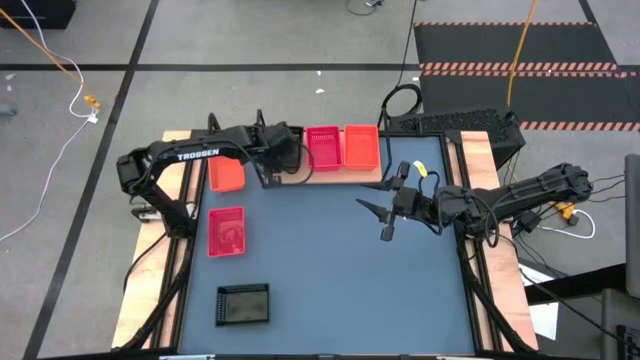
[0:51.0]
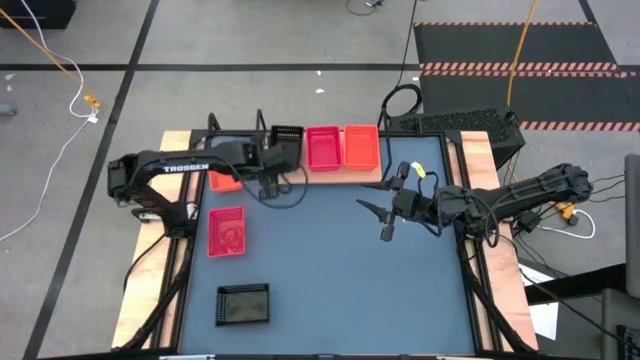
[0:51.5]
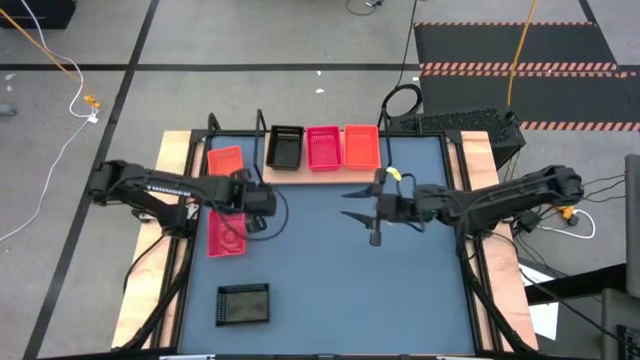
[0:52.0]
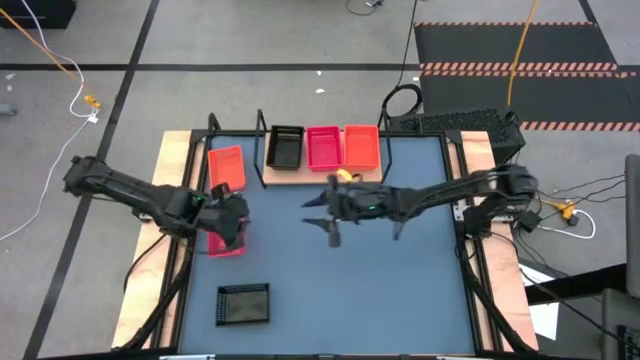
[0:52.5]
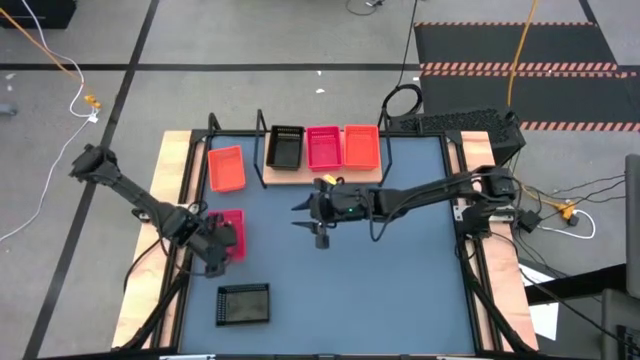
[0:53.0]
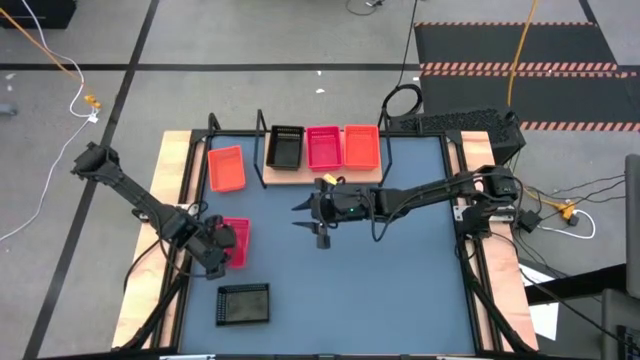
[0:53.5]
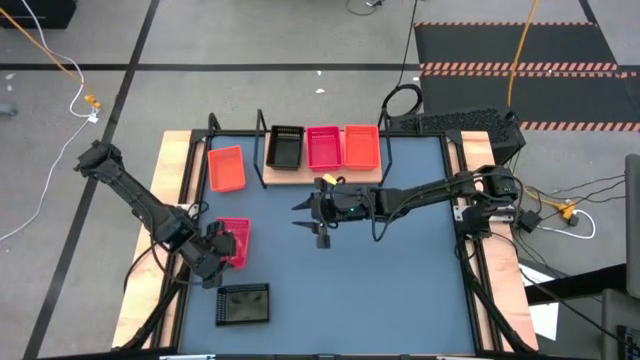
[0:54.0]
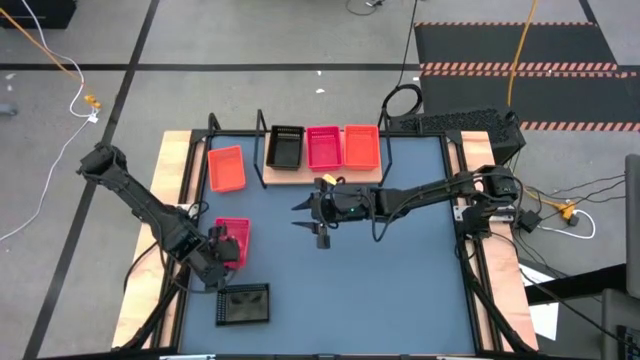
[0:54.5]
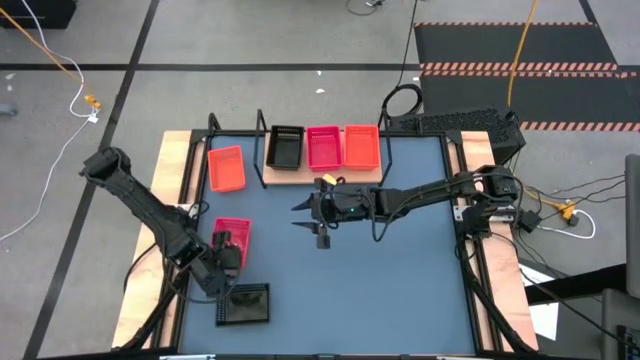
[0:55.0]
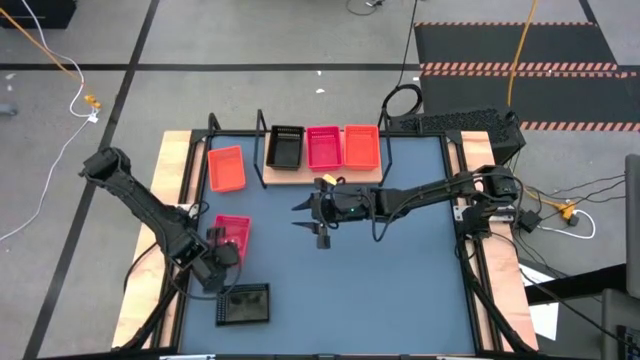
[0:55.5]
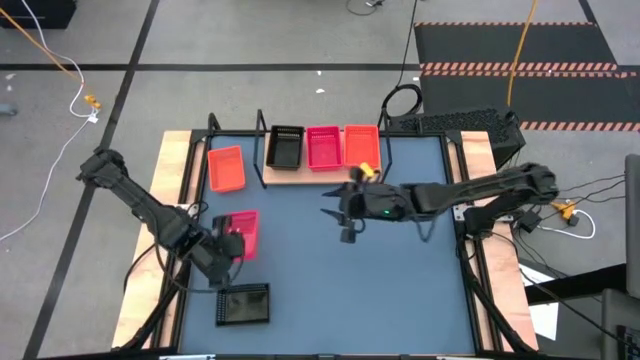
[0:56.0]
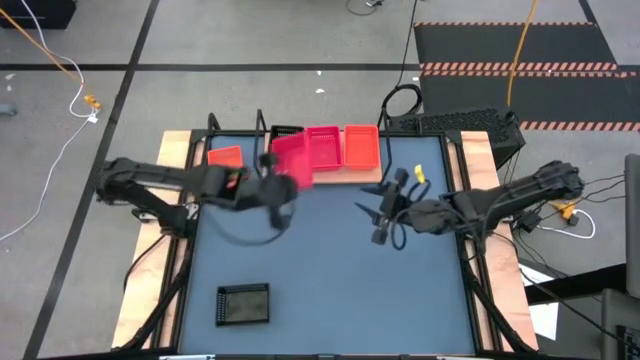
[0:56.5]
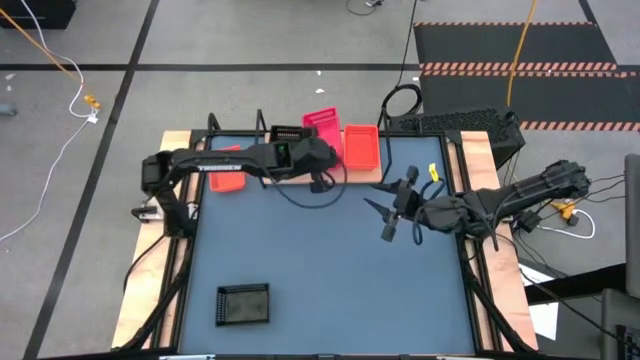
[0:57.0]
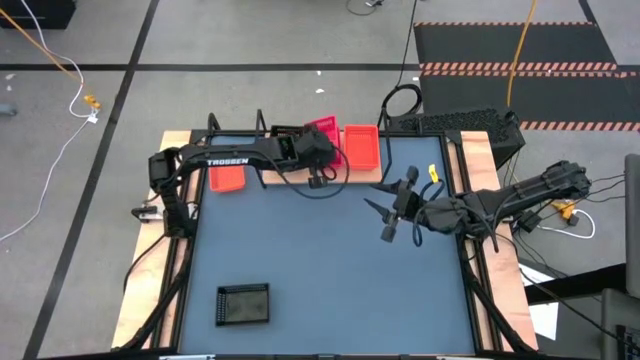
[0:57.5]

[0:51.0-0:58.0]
Task: Stack baskets on shelf by color
Stack the red bin on the red bin on the shelf

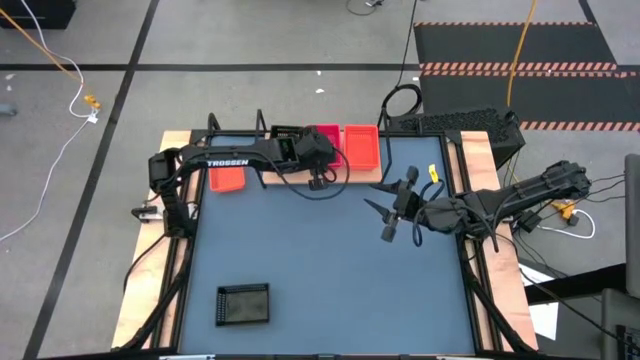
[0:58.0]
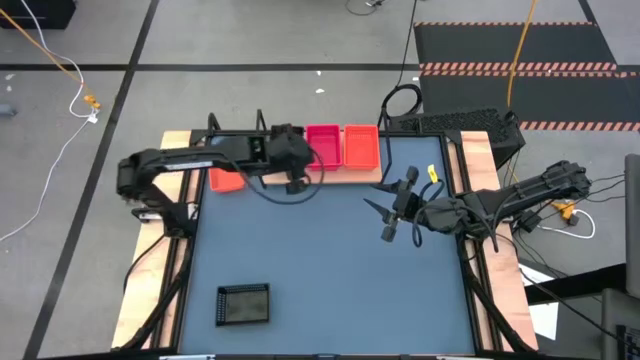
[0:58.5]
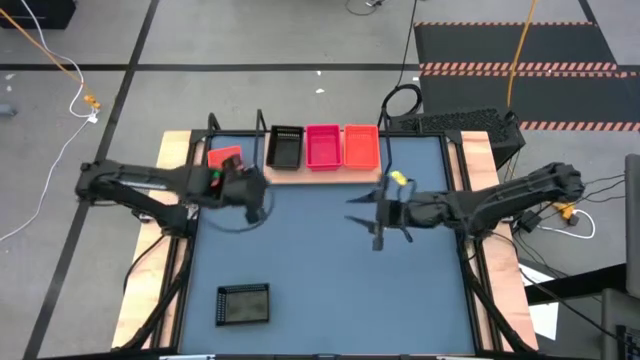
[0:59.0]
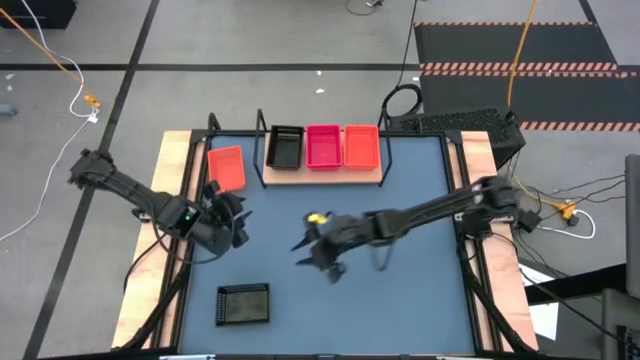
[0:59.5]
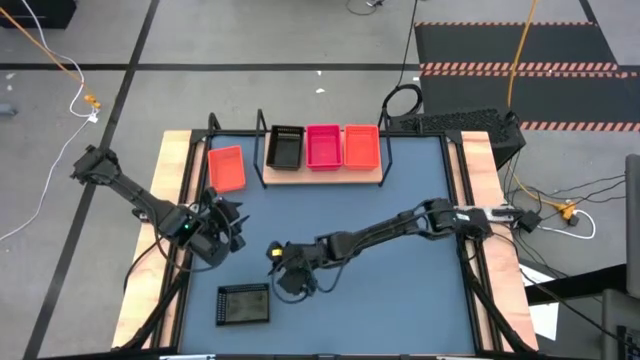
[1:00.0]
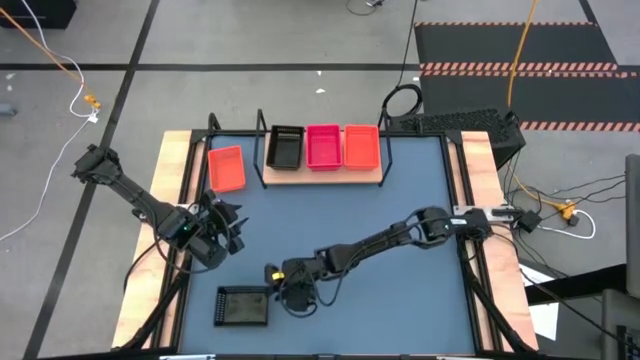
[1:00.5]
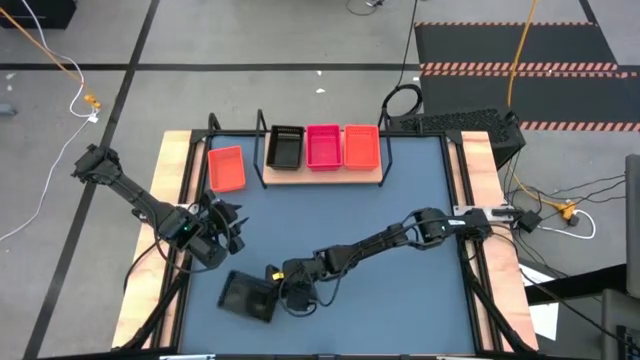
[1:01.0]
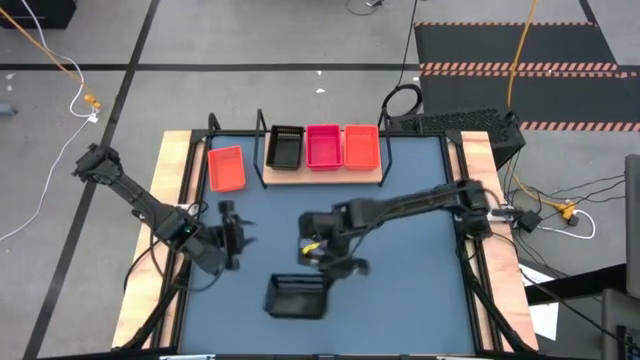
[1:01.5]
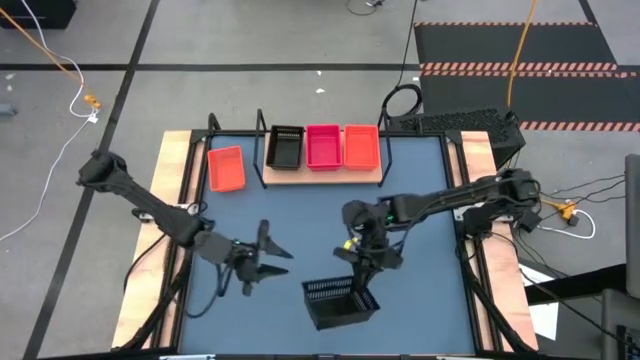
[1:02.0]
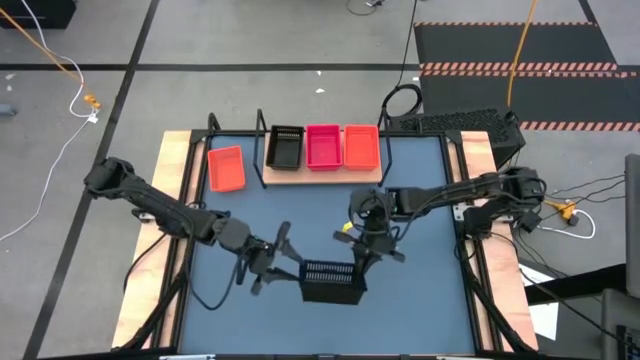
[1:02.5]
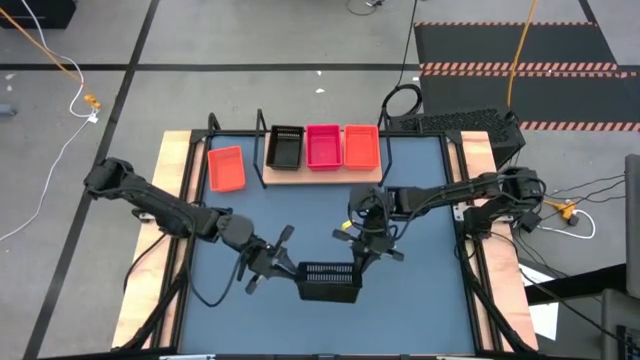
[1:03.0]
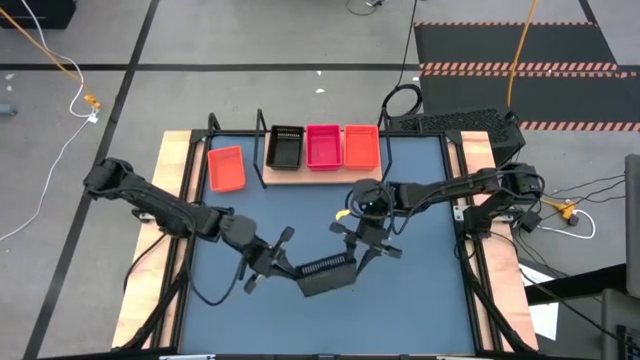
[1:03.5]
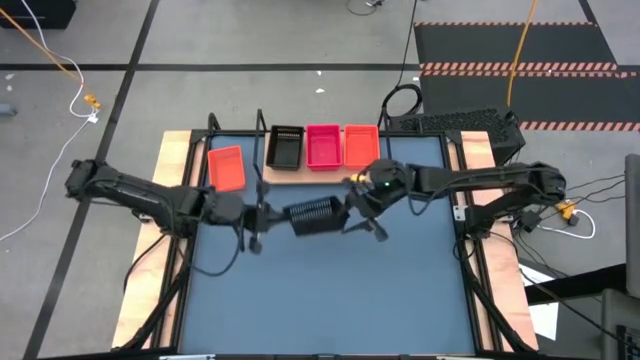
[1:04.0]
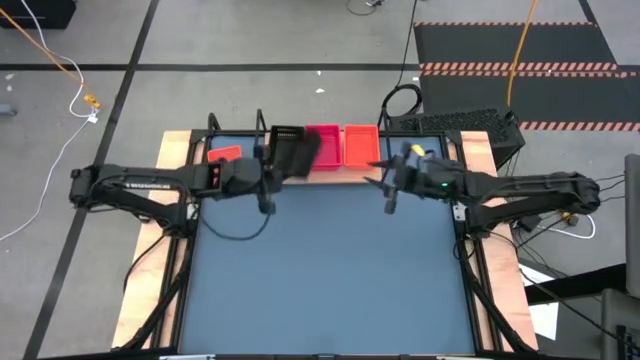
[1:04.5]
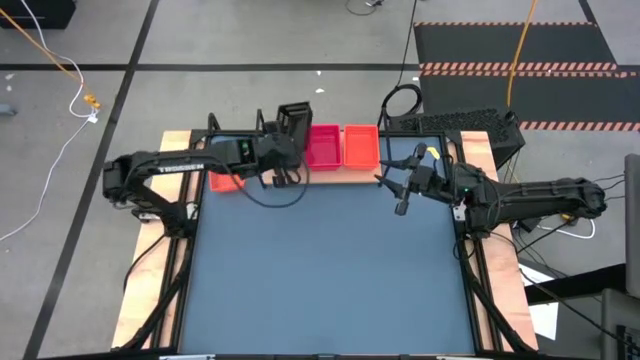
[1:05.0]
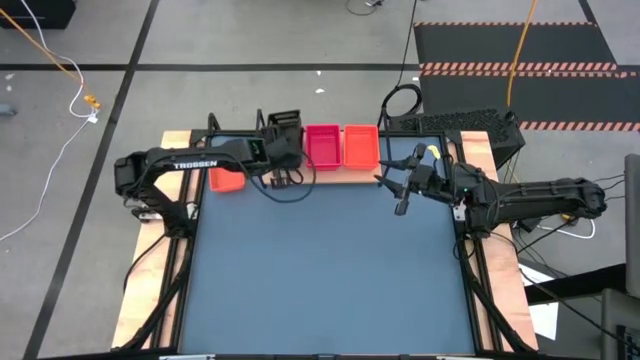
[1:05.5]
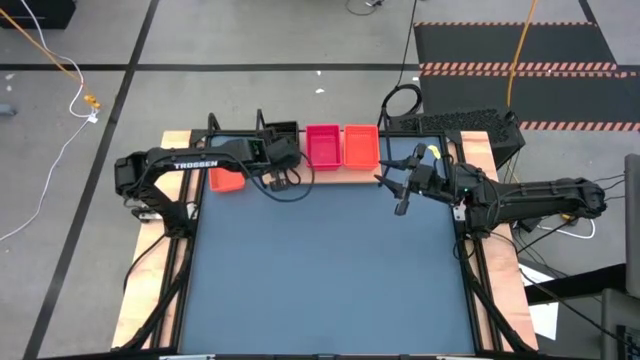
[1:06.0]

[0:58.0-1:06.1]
Stack the black bin on the black bin on the shelf

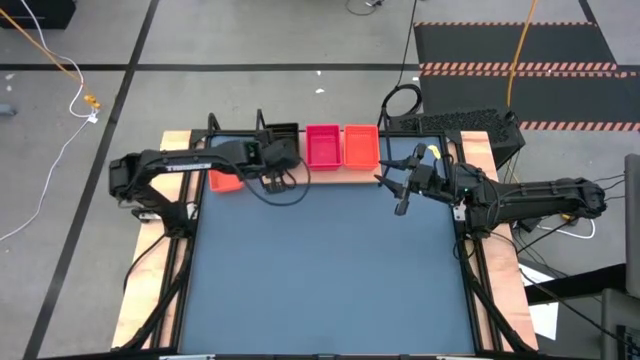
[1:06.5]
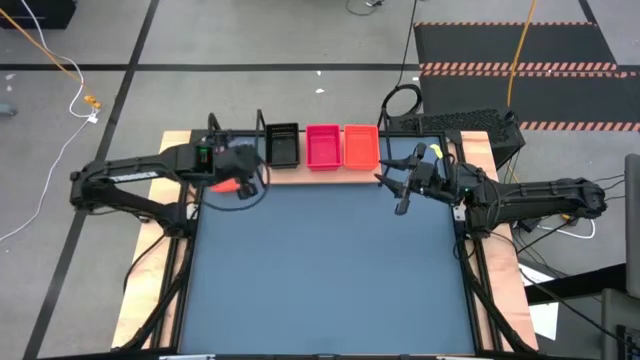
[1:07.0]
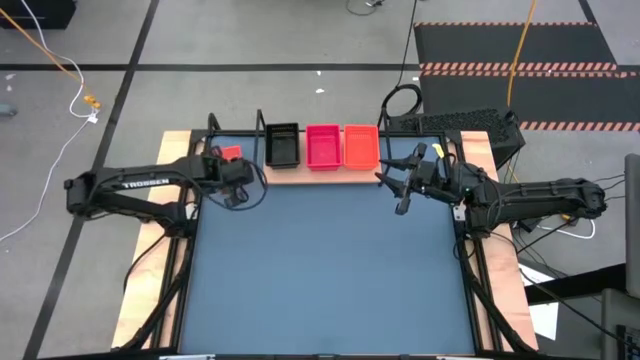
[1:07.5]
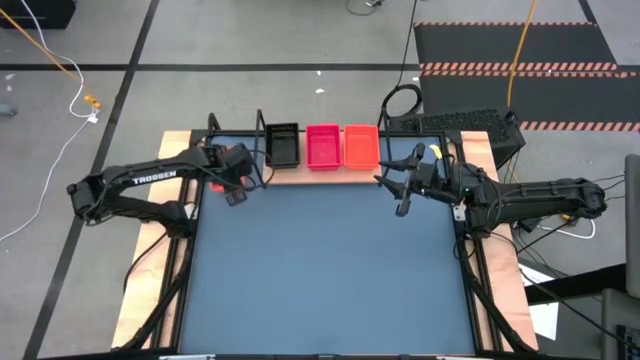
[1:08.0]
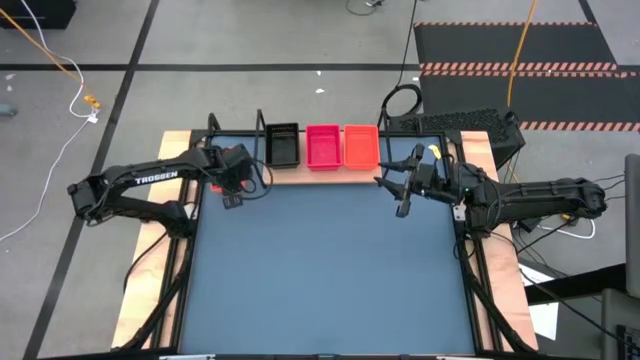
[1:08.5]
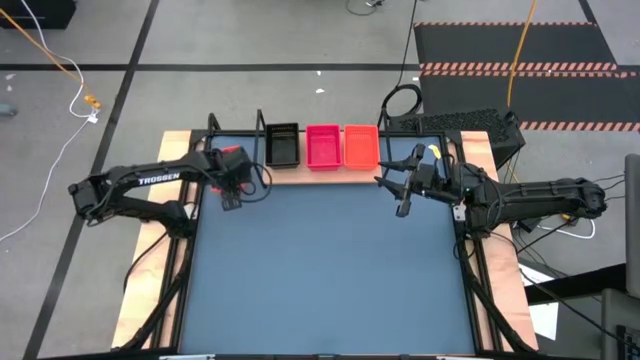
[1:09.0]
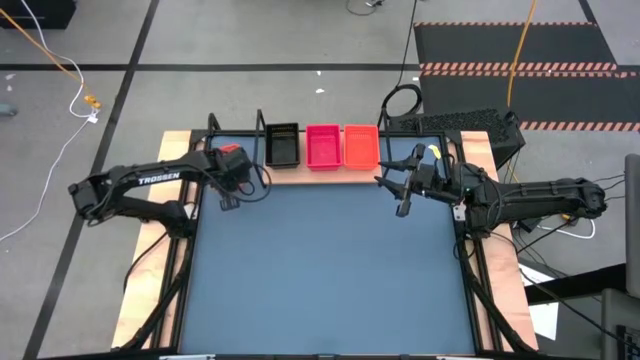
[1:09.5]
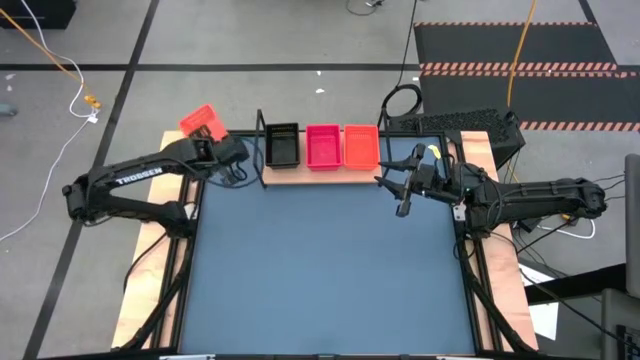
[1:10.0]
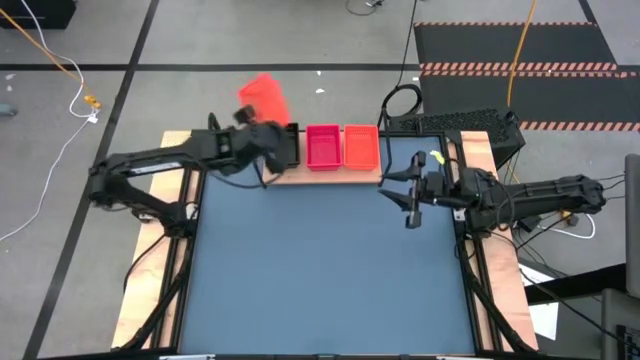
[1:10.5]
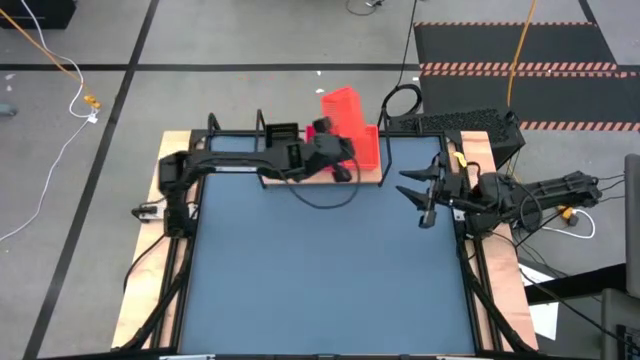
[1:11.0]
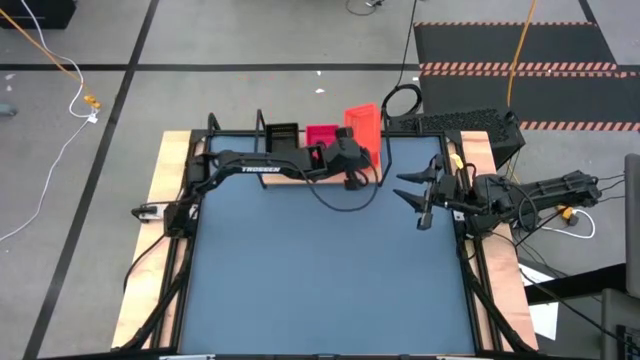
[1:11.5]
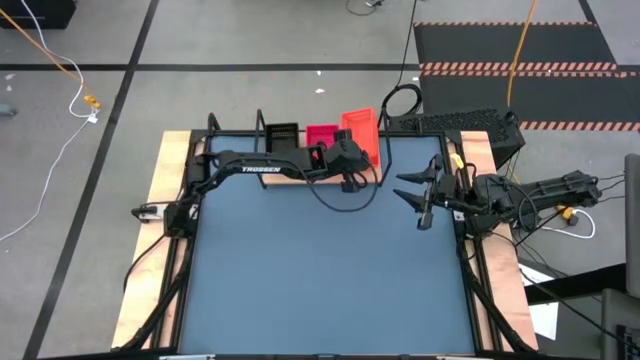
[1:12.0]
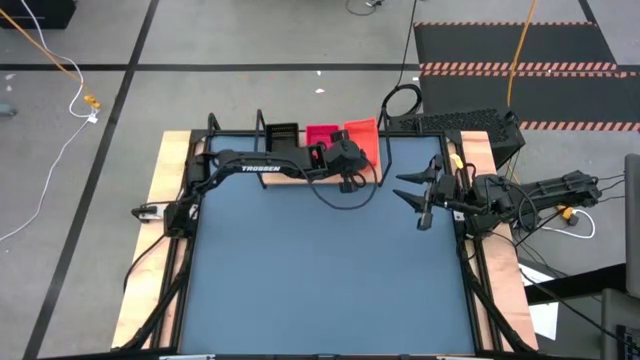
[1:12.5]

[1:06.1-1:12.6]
Stack the orange bin on the orange bin on the shelf
